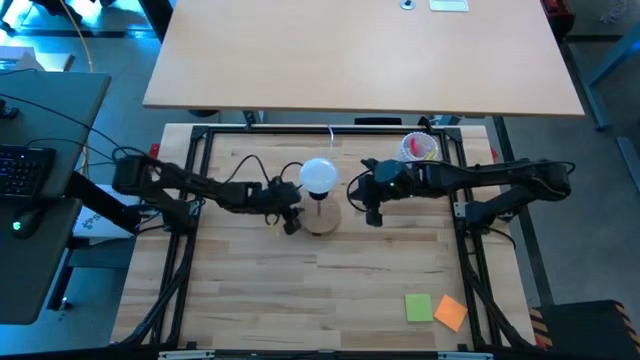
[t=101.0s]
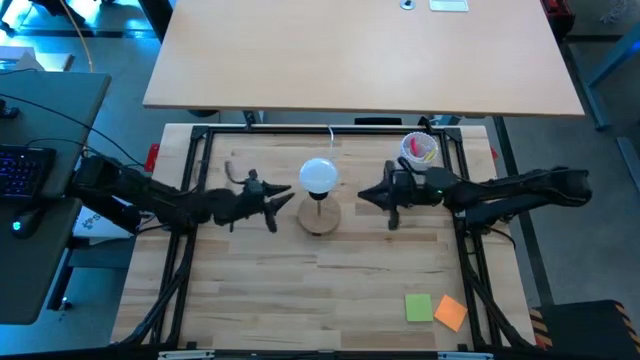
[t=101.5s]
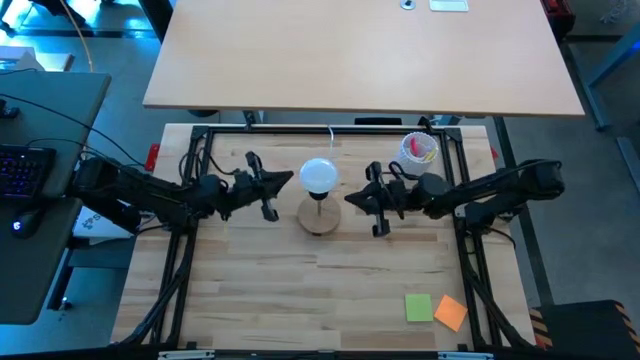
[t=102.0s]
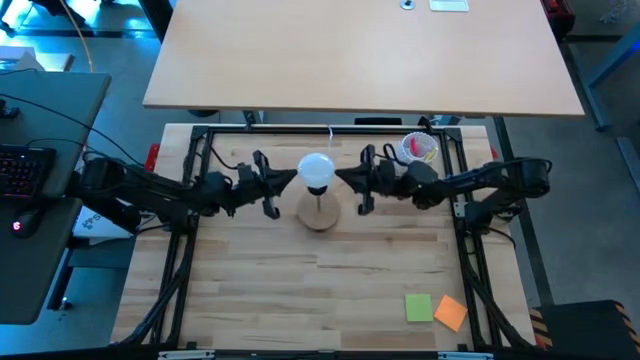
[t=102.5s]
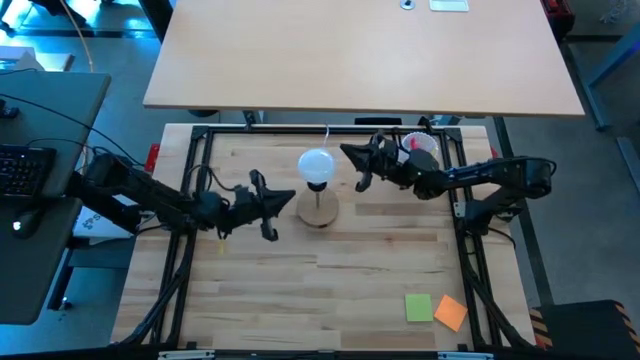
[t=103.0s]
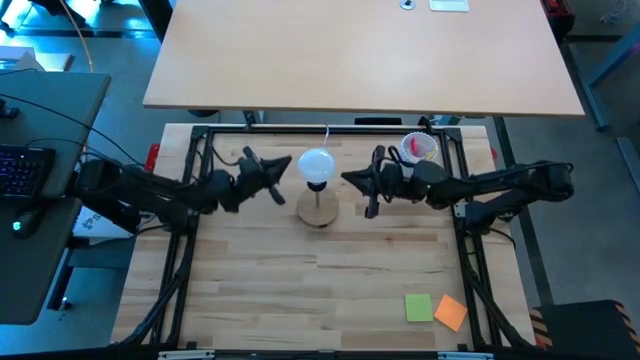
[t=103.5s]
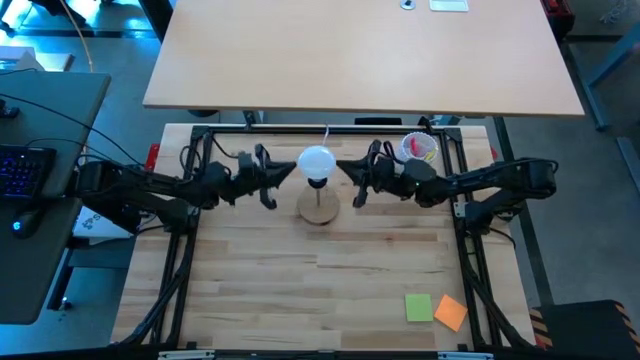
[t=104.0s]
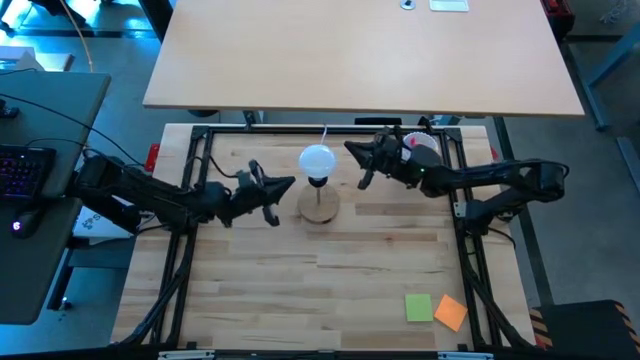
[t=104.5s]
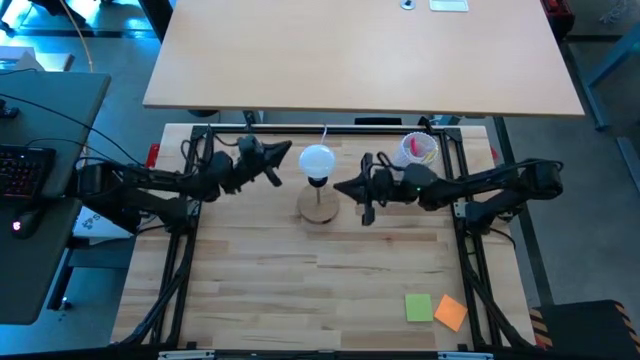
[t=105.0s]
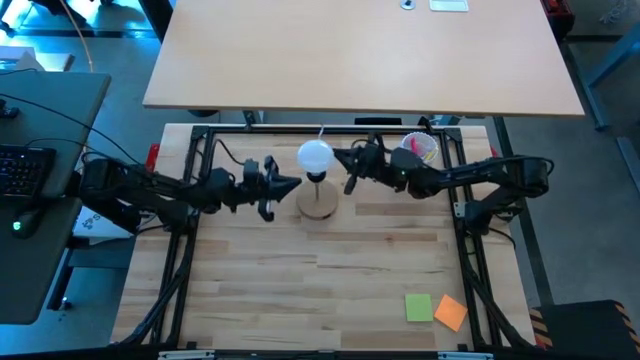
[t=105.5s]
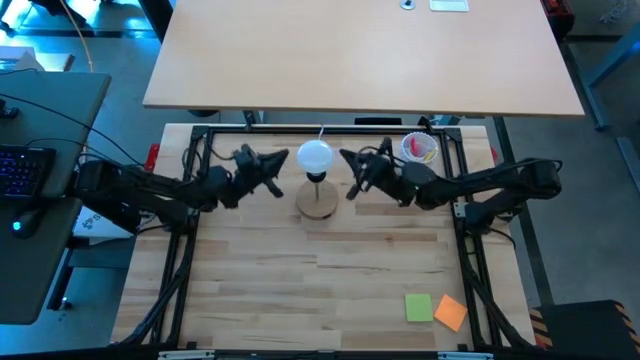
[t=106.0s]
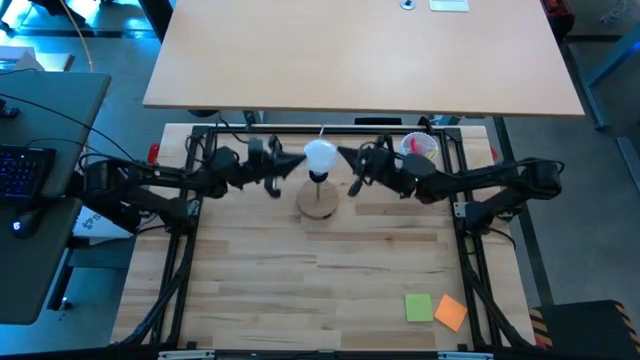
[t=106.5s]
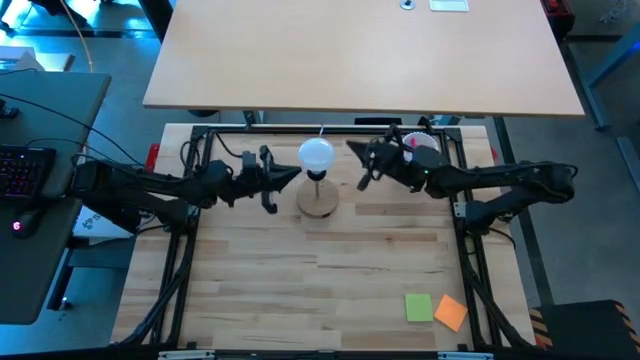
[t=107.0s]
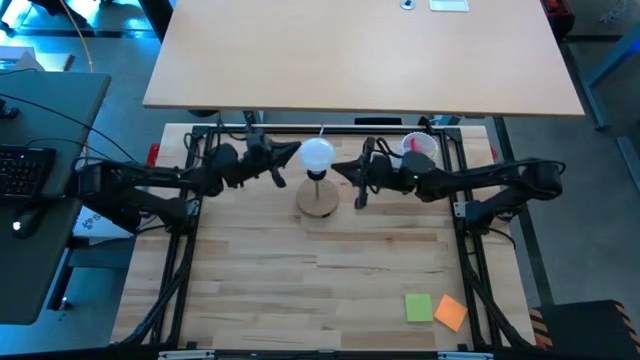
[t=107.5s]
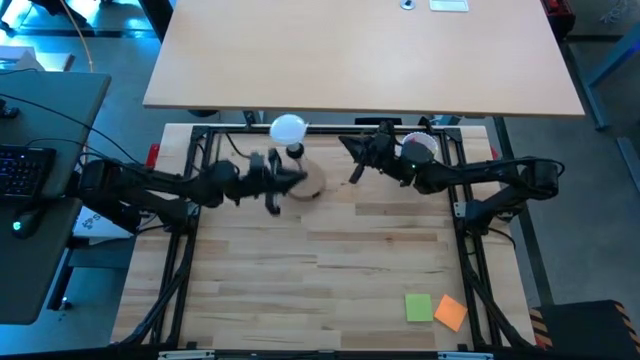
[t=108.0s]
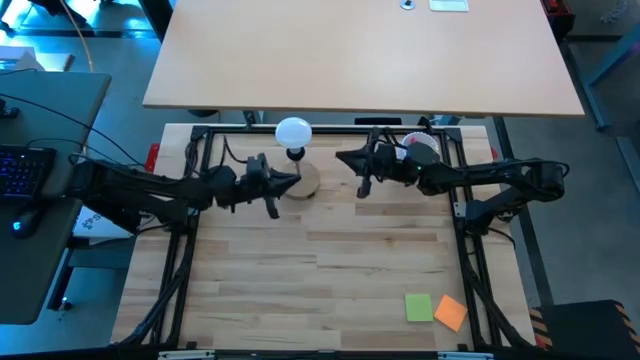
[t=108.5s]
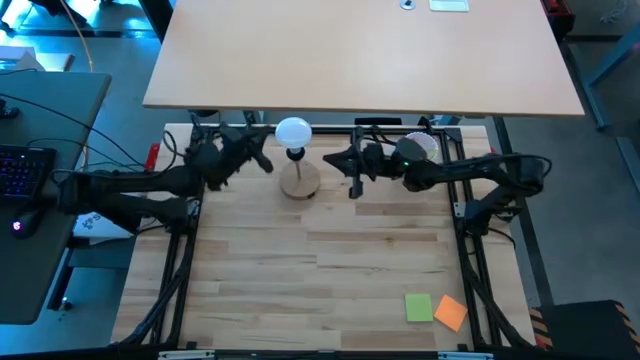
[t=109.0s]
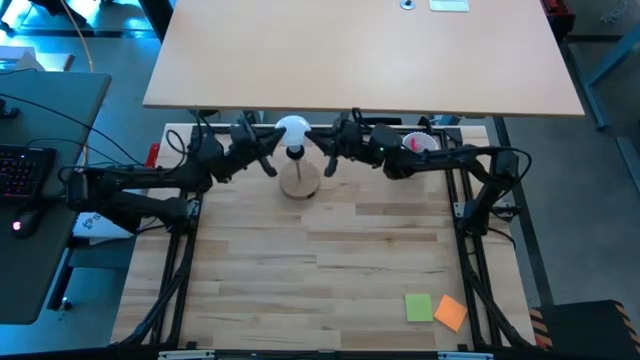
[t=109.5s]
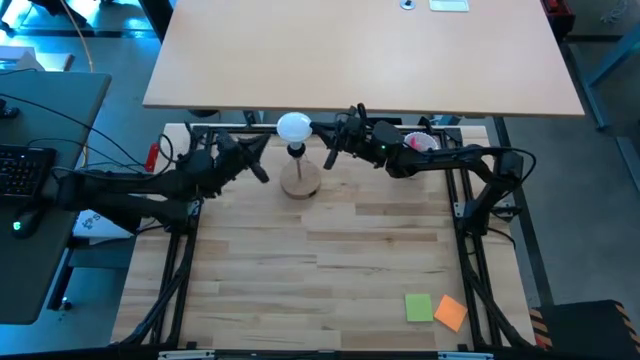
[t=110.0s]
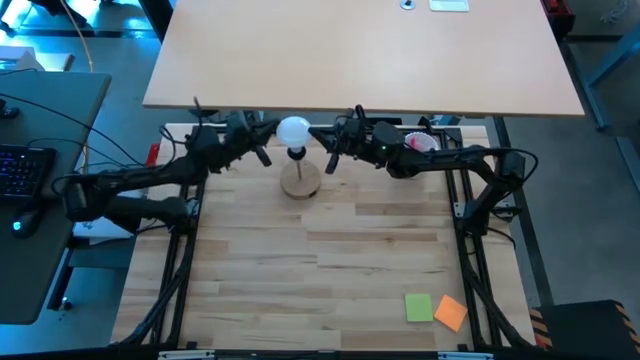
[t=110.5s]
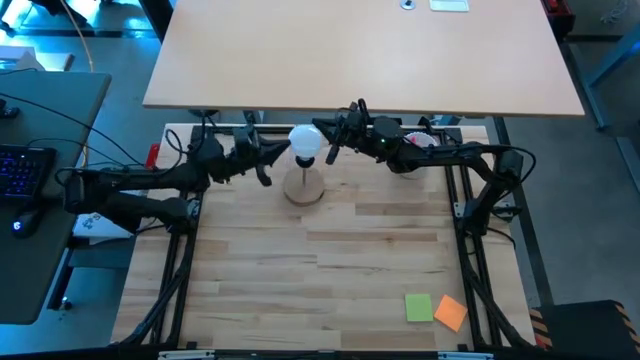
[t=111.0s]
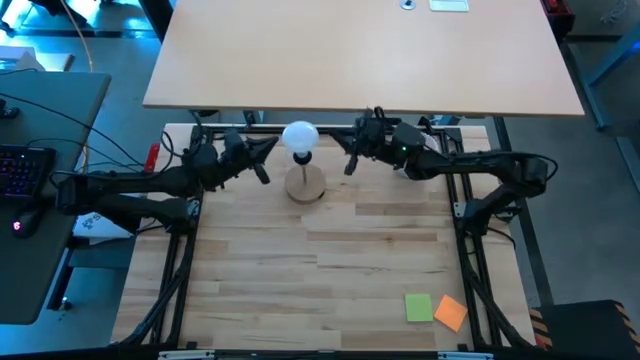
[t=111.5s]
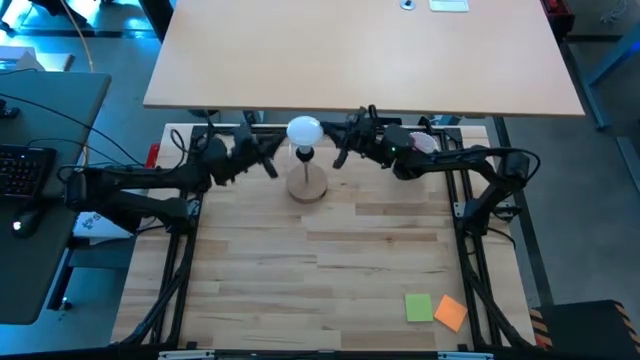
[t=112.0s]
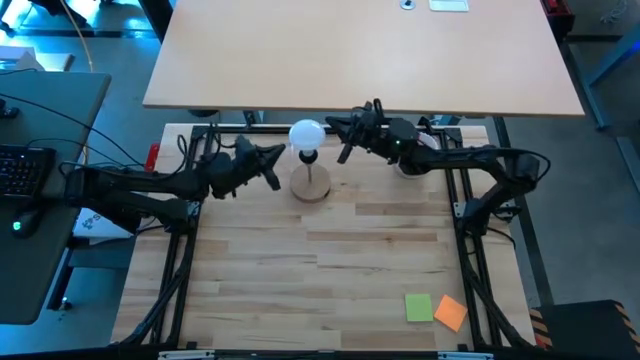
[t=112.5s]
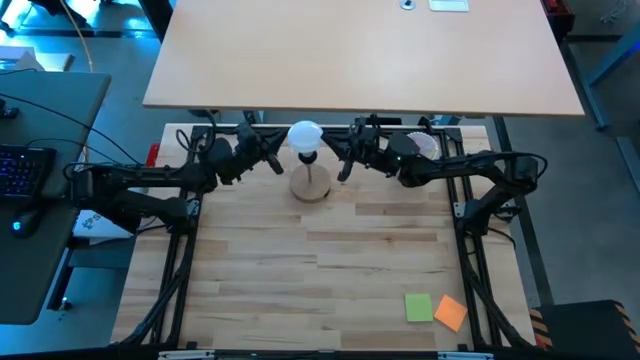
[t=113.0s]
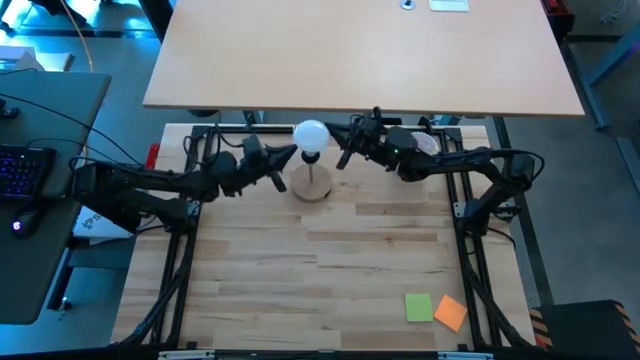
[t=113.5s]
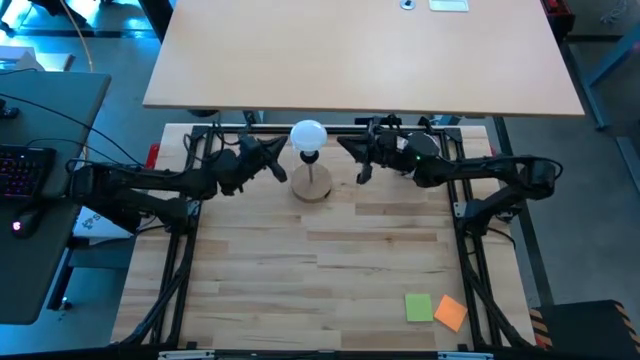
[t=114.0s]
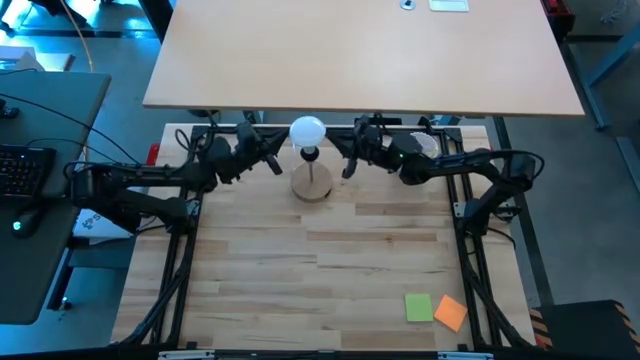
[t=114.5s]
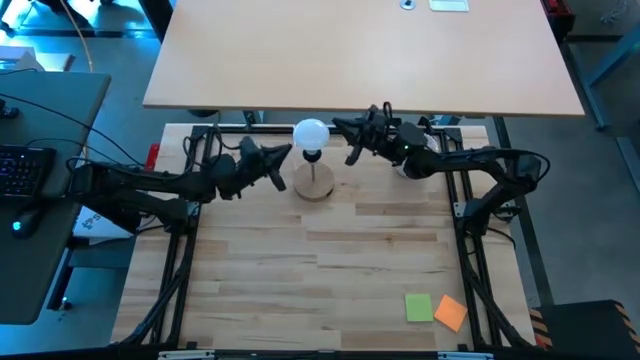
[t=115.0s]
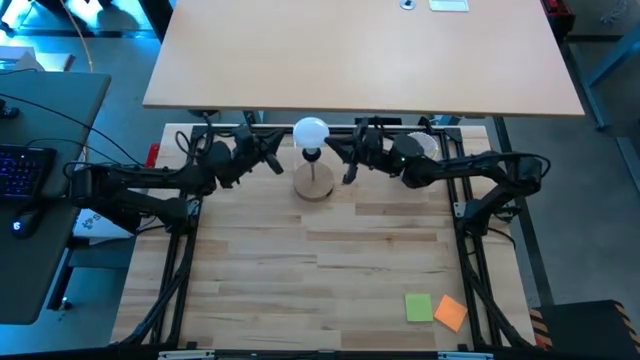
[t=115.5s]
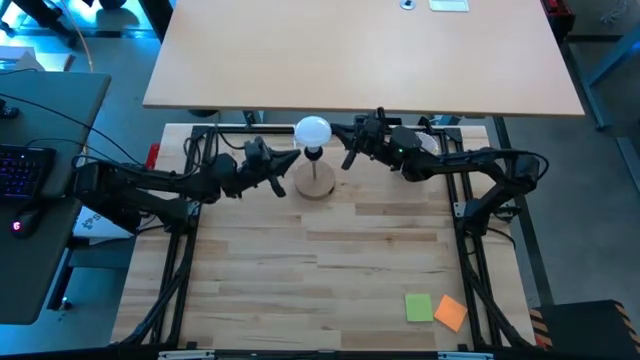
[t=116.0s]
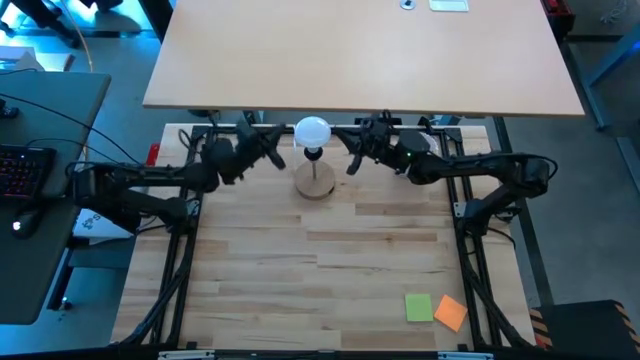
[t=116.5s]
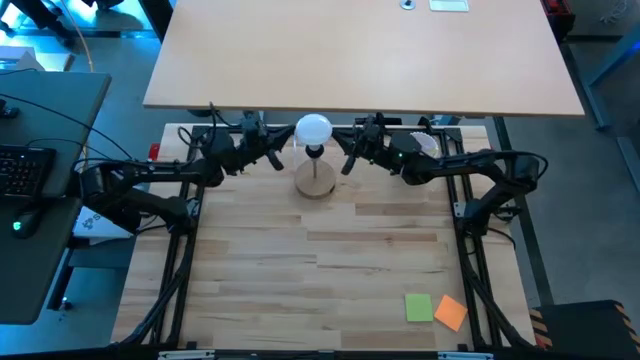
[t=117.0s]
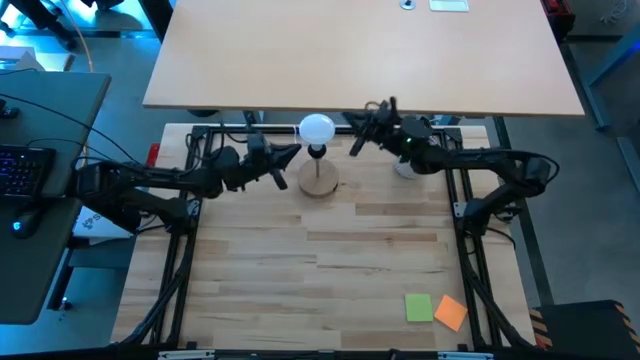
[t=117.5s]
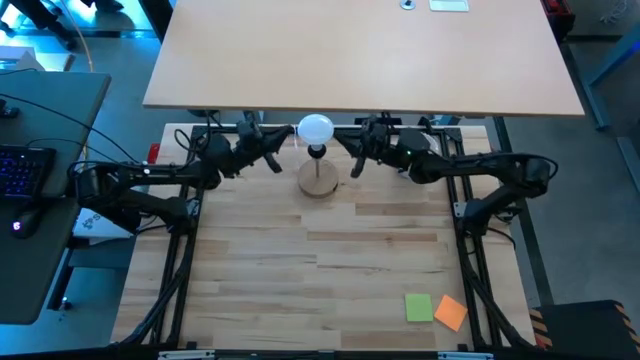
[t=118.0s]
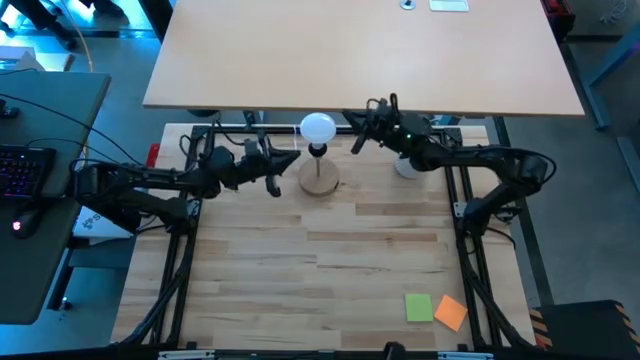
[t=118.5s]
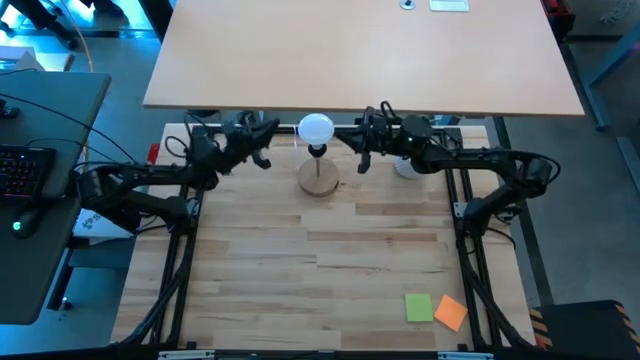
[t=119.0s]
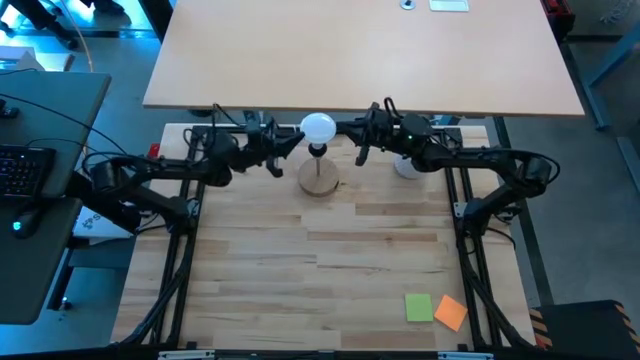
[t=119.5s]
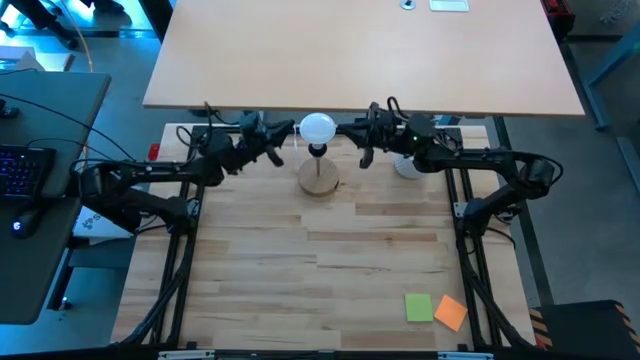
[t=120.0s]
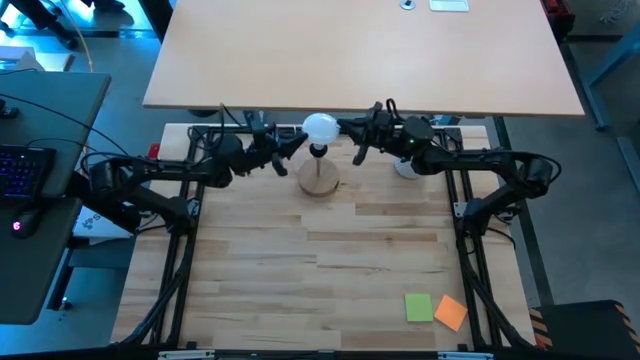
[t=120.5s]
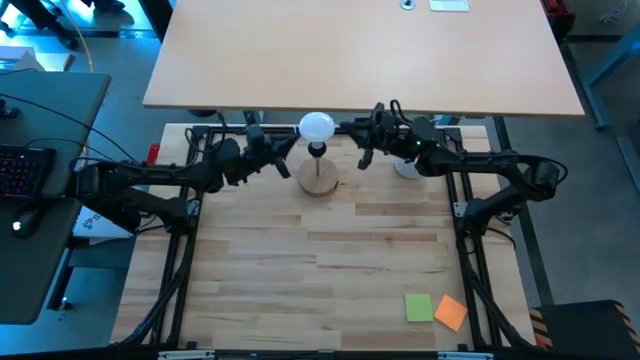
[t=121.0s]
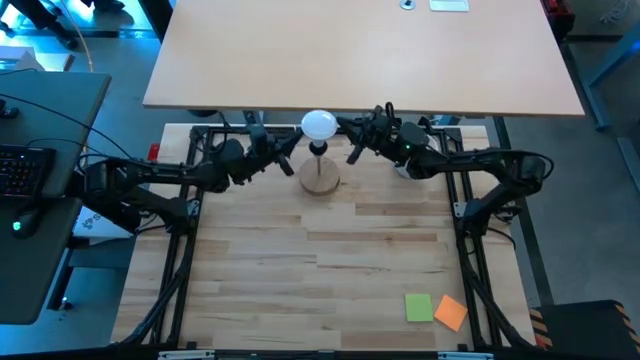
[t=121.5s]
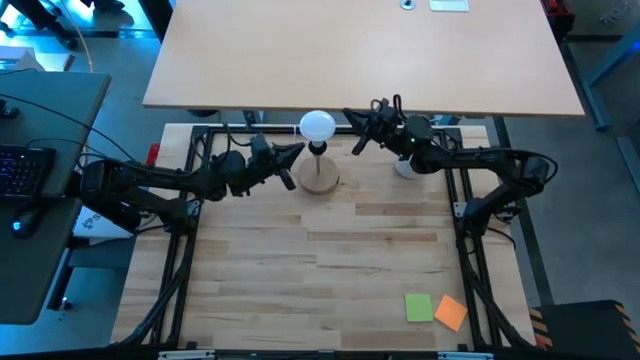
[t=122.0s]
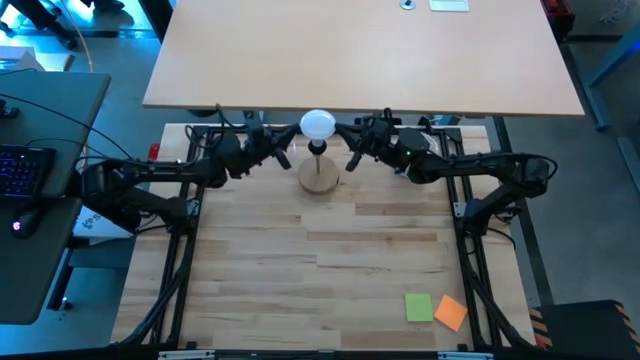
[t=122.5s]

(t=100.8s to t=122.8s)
Task: Screw lightbulb
Remove the lightbulb from the brown lamp
